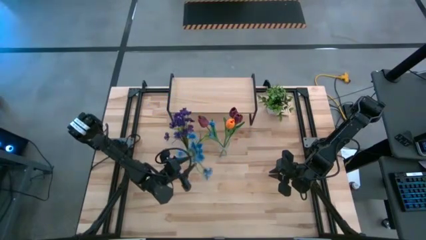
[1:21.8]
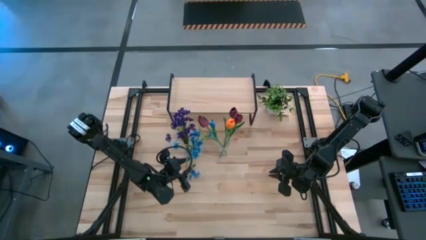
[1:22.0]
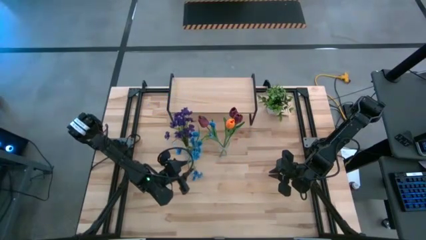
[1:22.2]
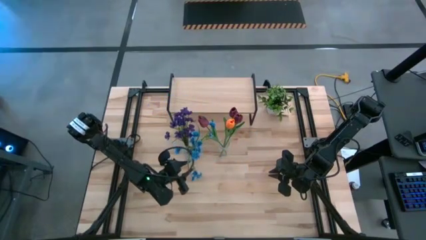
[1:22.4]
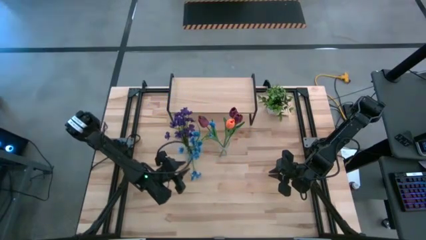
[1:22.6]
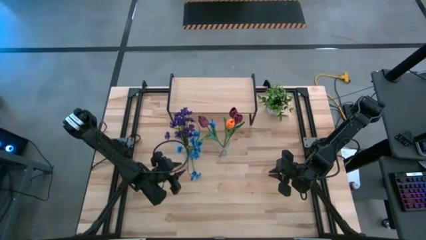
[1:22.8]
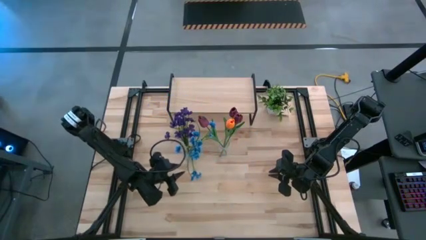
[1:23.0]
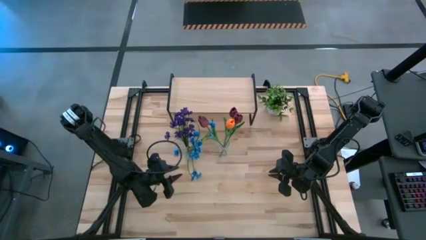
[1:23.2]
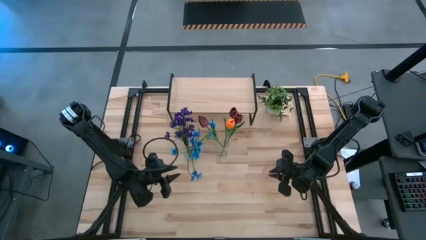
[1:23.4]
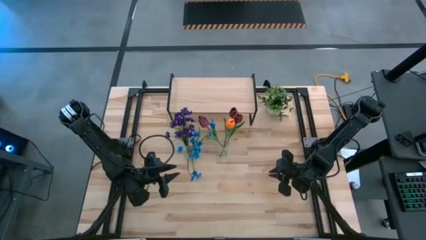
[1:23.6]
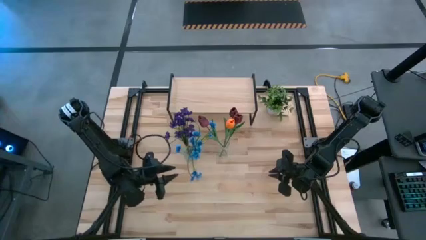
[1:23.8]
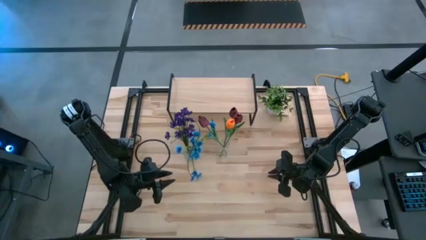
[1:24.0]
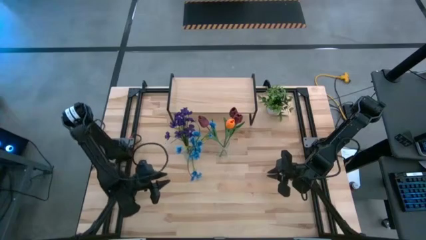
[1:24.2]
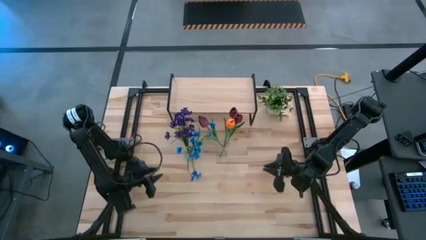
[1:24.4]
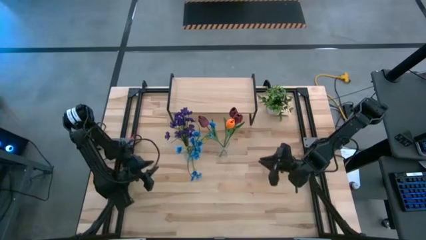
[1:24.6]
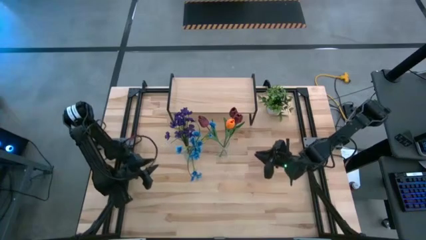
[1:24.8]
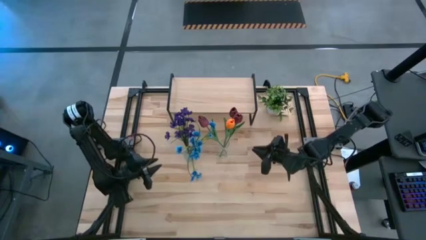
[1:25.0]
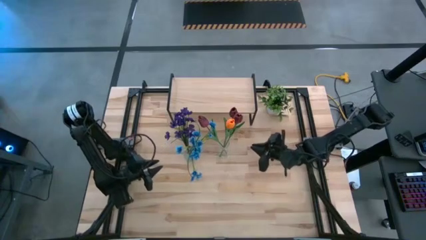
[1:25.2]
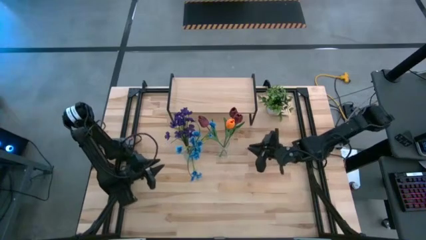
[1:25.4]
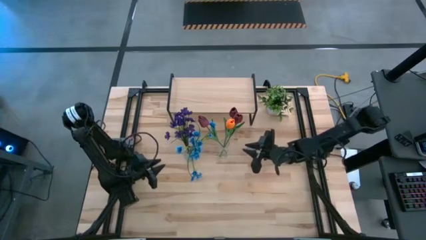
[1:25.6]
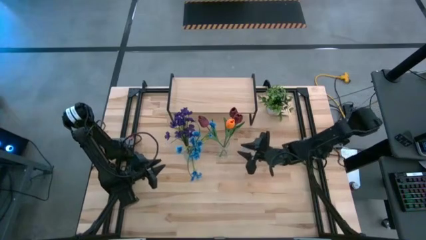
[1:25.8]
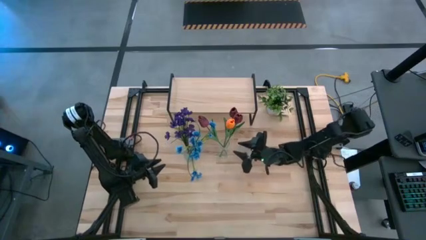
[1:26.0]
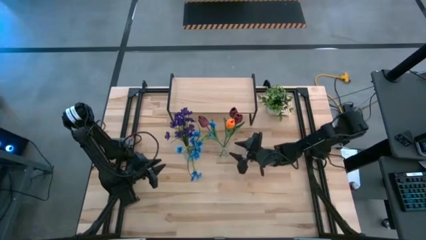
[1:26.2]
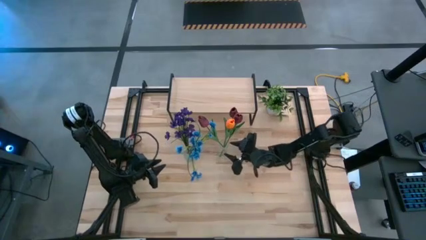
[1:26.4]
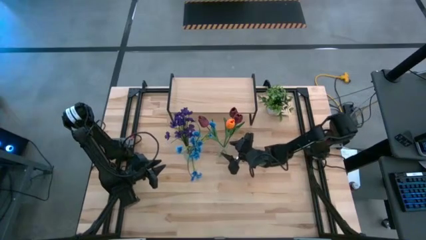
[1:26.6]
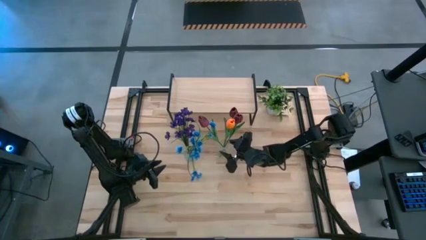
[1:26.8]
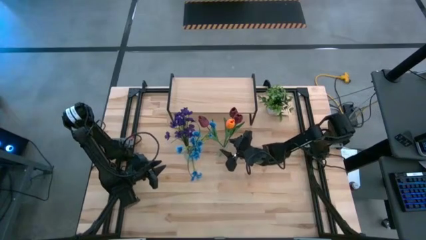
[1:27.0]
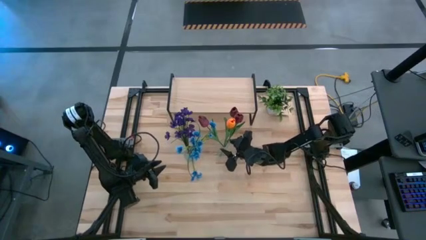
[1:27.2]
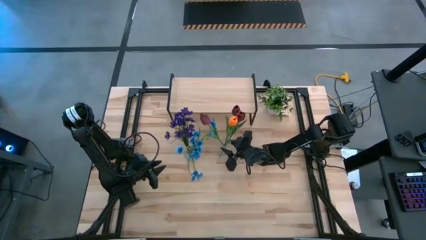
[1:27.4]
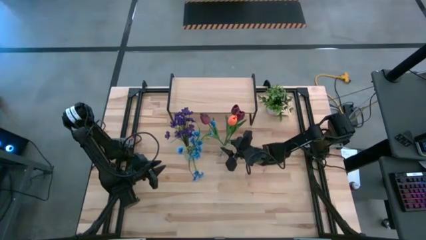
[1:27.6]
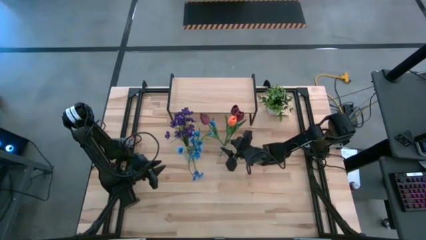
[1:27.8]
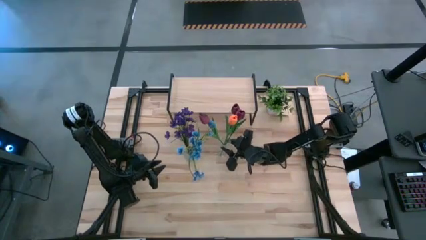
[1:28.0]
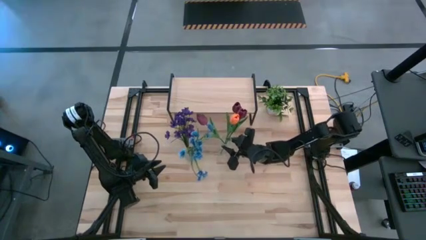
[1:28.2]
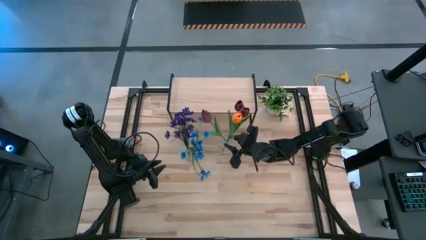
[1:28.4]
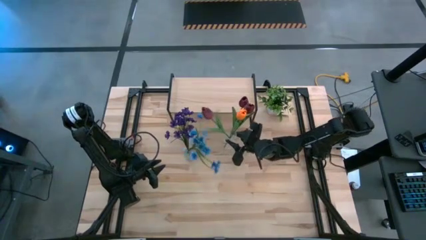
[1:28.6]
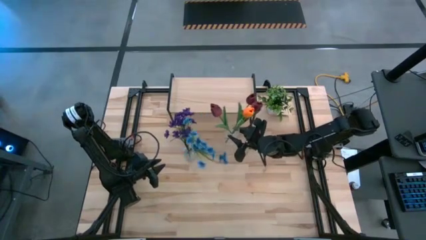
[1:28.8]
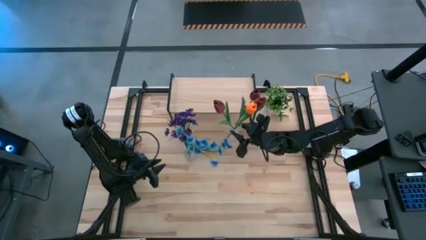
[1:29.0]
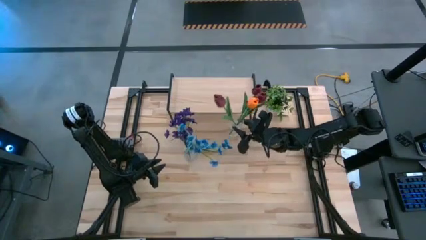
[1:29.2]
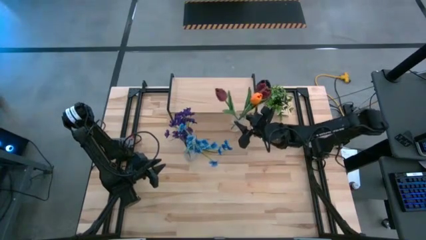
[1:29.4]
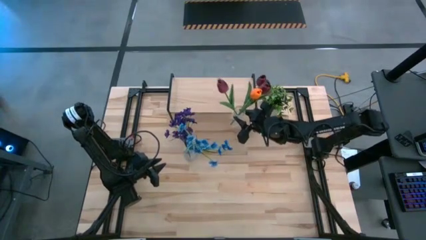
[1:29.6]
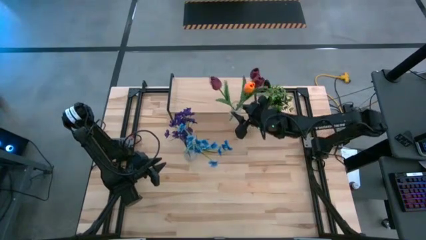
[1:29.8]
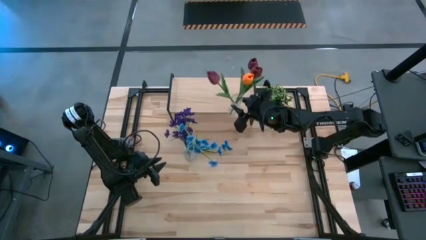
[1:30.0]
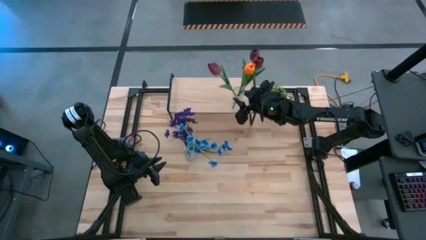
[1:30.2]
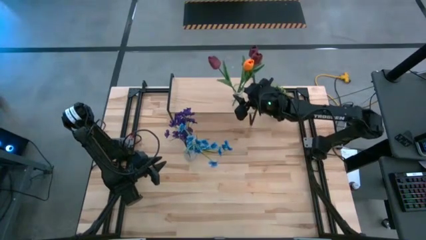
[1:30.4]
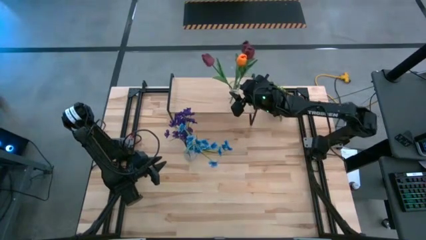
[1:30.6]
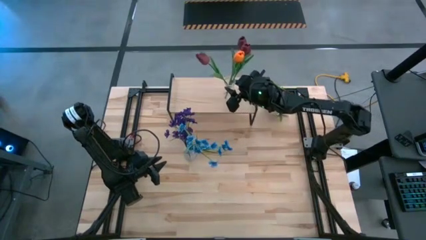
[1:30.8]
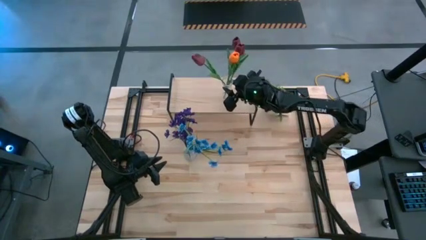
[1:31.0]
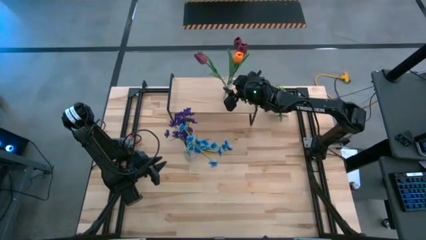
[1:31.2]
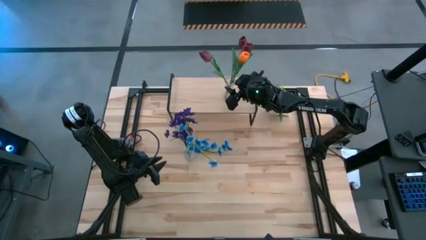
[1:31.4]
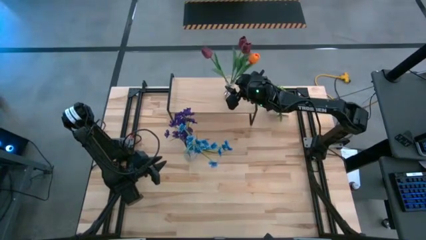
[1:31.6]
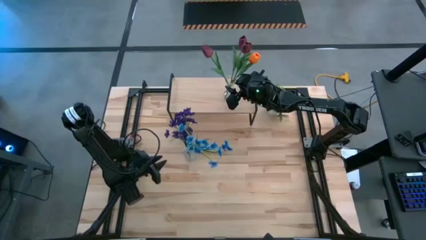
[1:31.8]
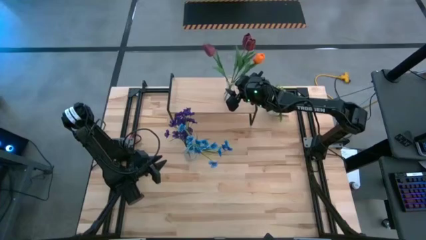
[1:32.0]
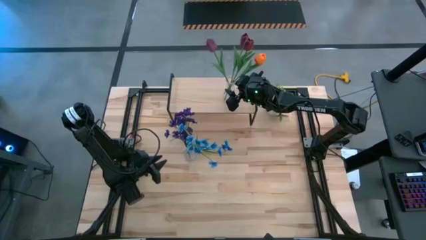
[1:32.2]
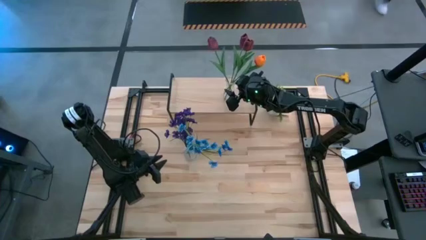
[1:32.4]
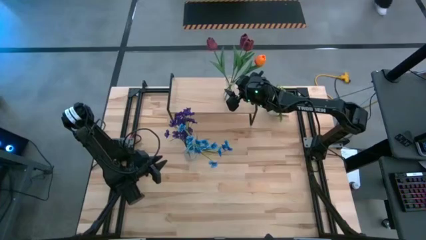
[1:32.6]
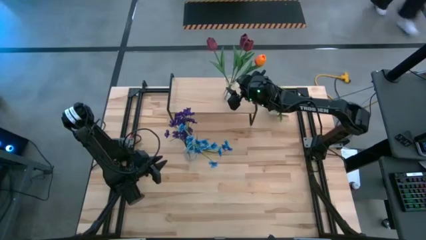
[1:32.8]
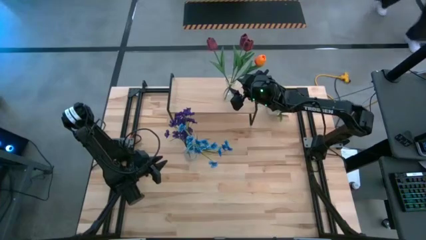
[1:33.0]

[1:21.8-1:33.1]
Task: Pick and place flowers into a vace then onto a shelf
Put the right transparent vase with tulips on the shelf

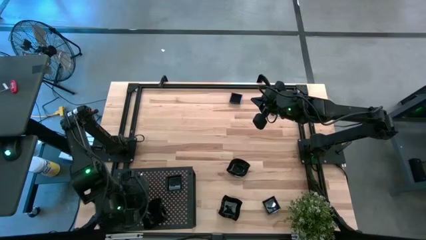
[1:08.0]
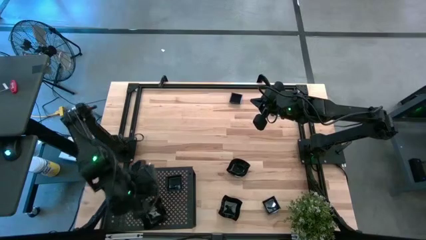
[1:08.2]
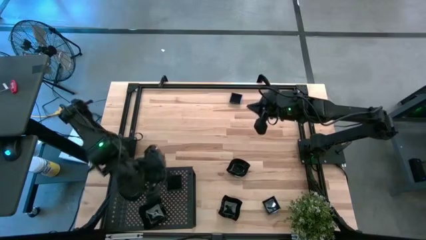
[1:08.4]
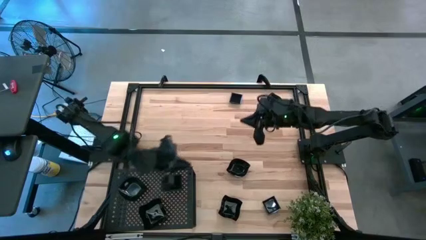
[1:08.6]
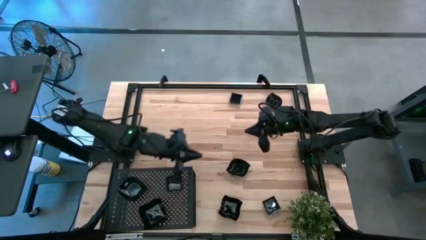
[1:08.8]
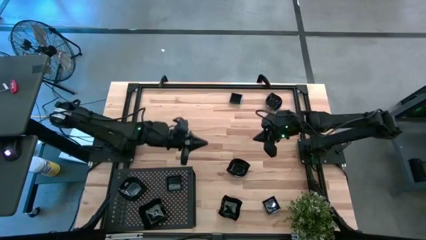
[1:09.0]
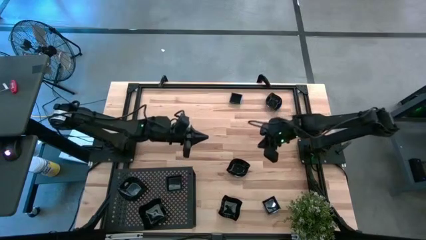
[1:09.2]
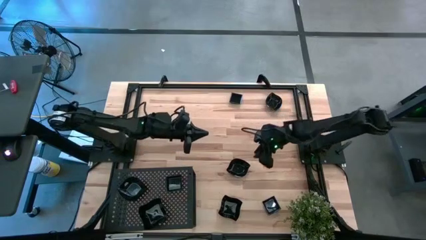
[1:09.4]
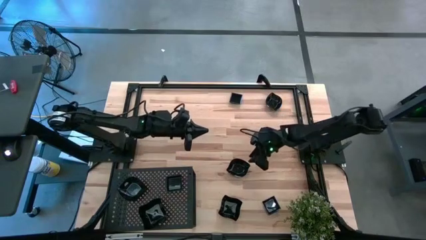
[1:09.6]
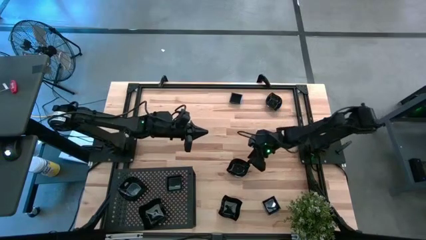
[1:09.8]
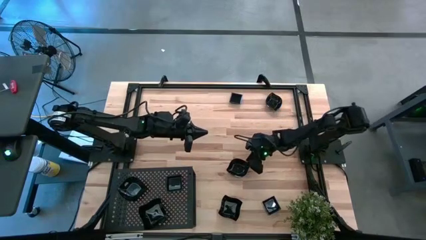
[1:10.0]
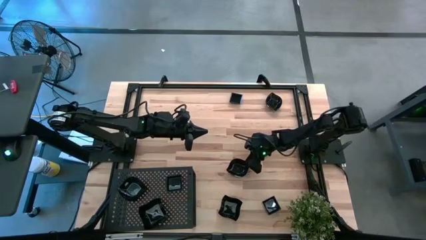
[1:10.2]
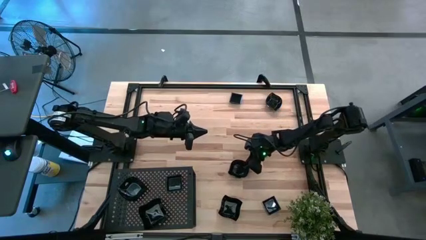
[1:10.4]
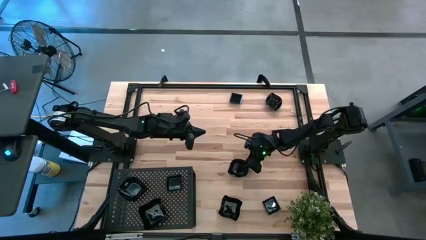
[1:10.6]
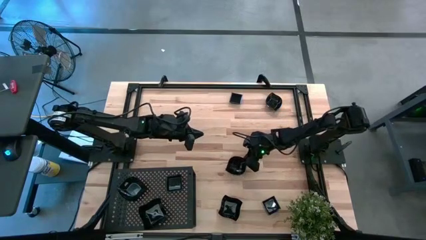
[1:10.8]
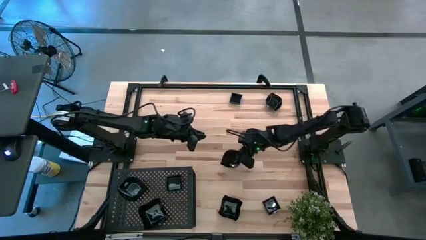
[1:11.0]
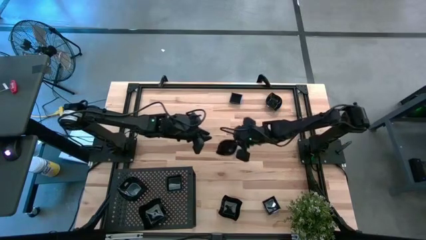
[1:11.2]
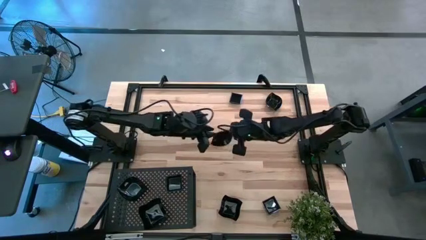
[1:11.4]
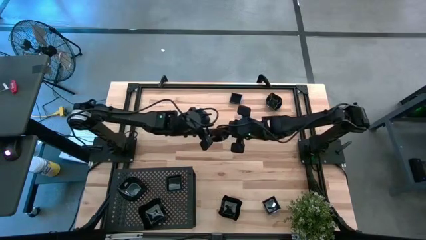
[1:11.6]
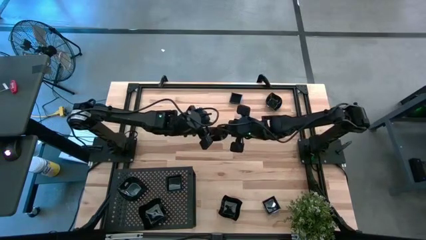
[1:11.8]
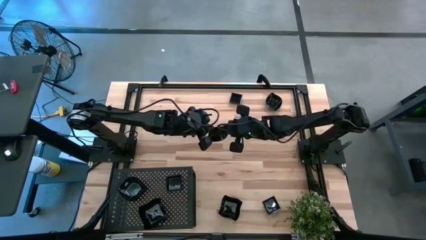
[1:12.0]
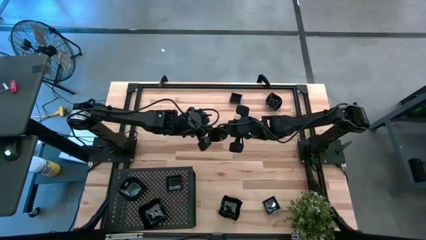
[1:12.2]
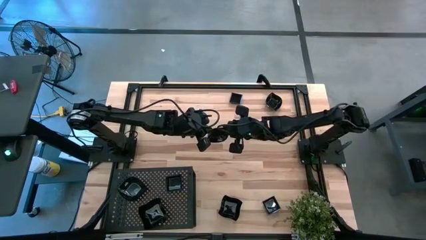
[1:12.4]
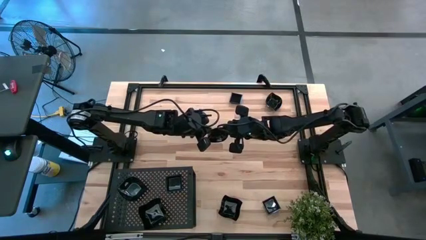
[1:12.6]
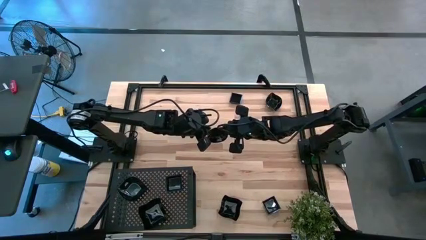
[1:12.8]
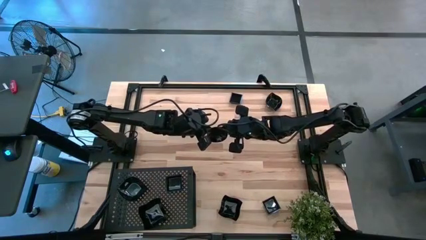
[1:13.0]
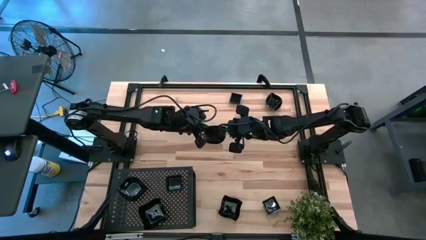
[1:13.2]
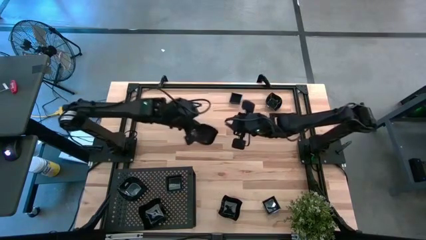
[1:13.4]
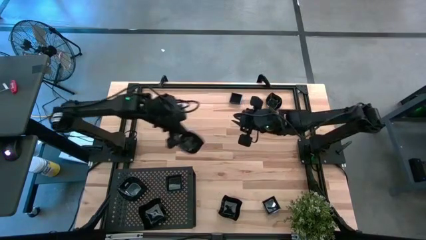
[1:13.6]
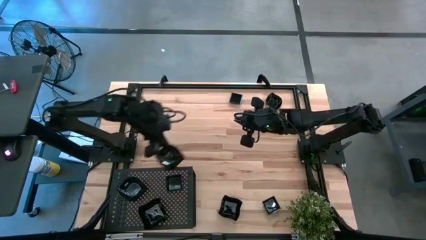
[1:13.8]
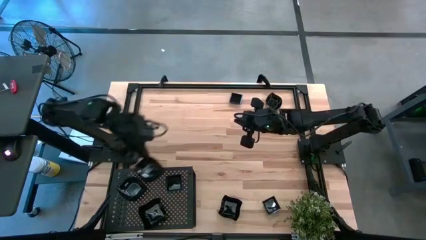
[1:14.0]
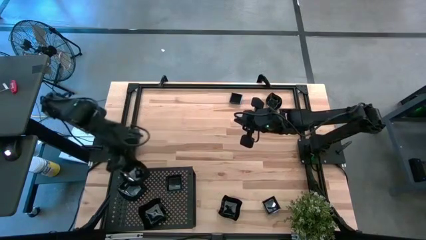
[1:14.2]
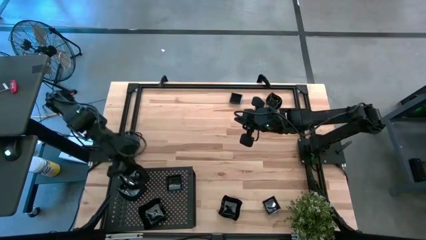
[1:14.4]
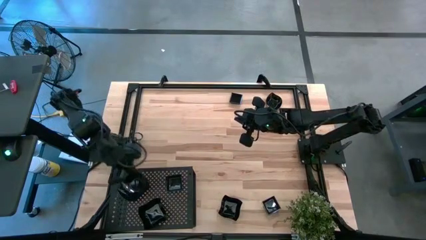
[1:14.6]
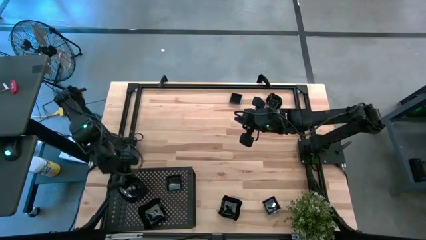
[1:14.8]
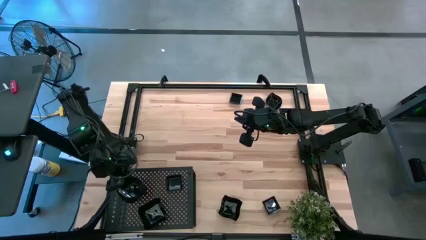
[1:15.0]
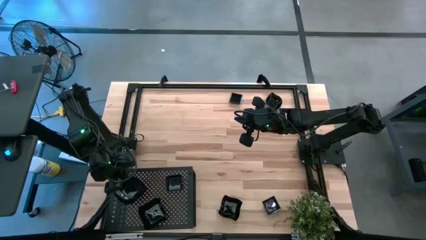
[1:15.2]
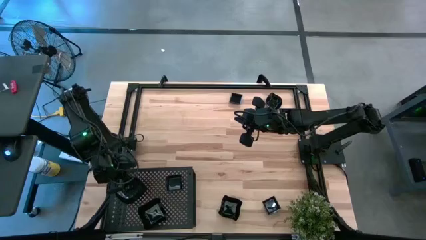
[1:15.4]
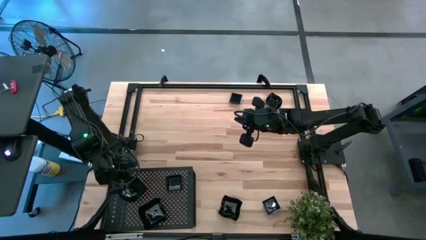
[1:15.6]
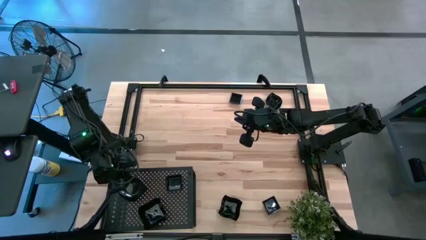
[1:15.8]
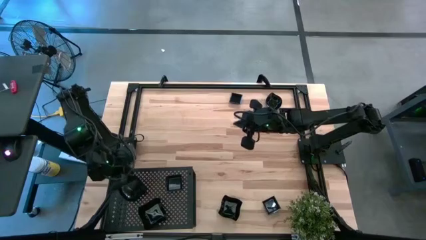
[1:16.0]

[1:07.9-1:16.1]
Task: Pick & Place Mini shaped plates
Stack the leaf-shaped plate on top of the leaf-shaped plate on the shelf
